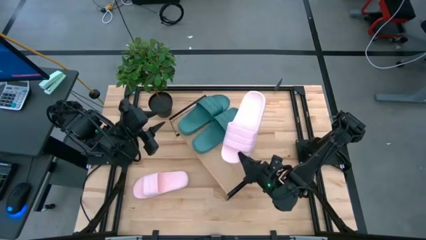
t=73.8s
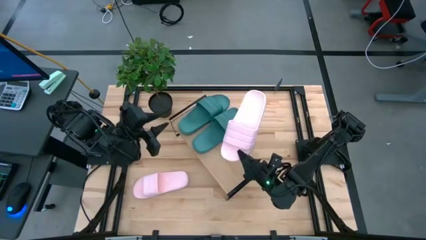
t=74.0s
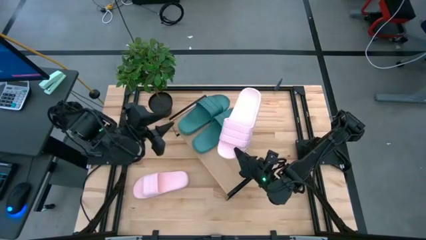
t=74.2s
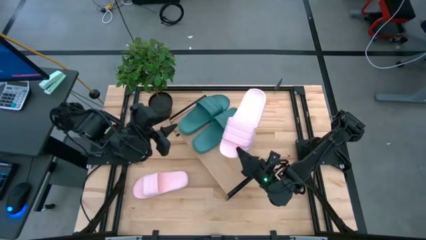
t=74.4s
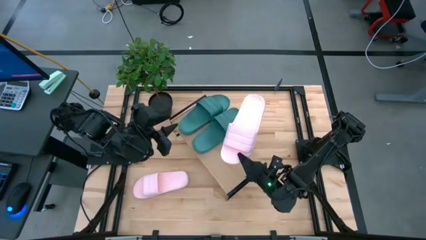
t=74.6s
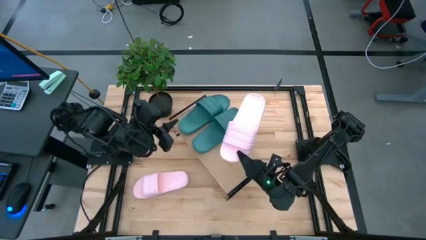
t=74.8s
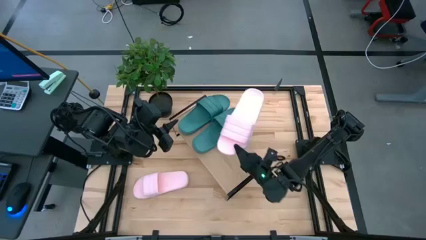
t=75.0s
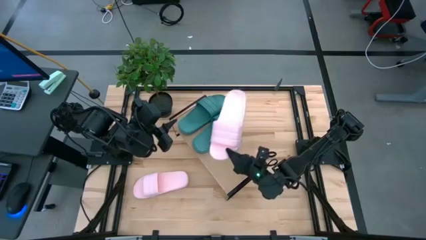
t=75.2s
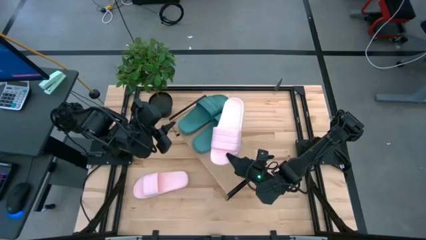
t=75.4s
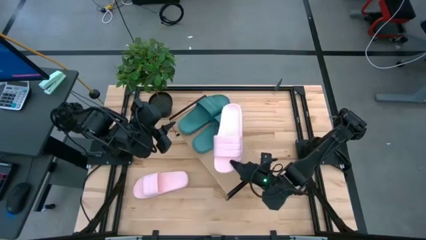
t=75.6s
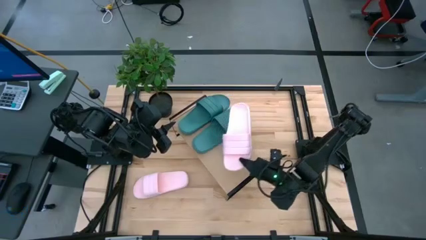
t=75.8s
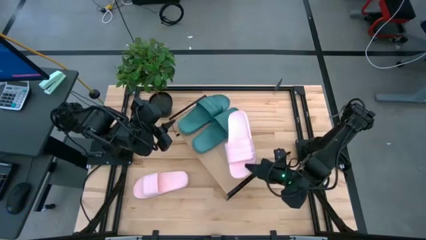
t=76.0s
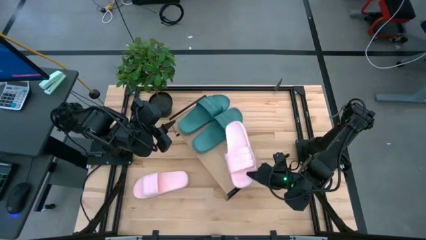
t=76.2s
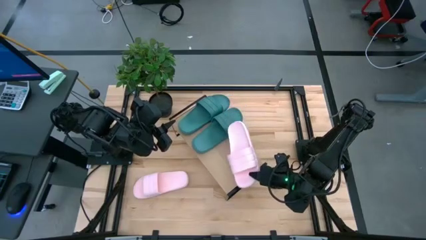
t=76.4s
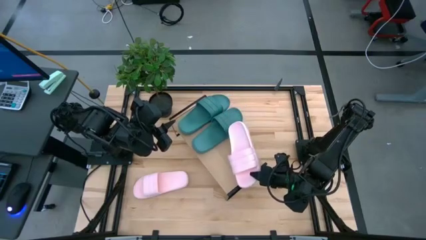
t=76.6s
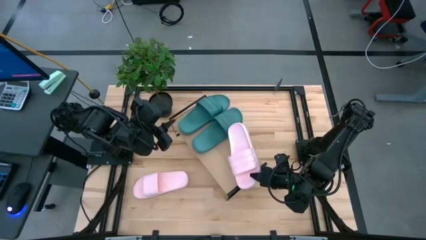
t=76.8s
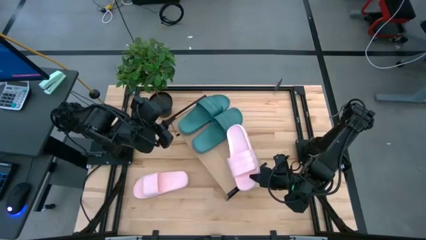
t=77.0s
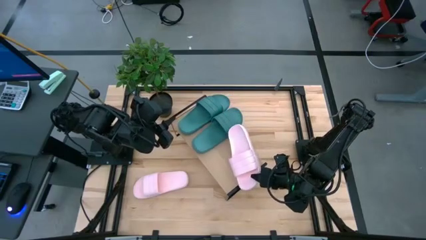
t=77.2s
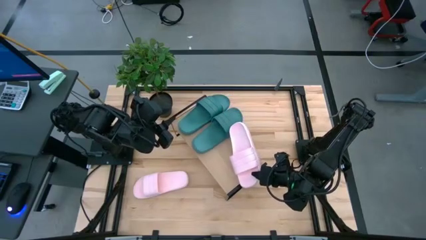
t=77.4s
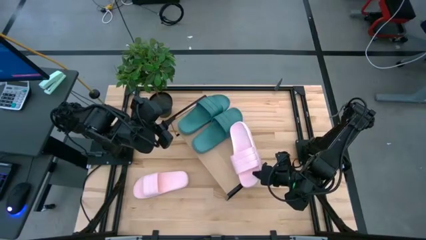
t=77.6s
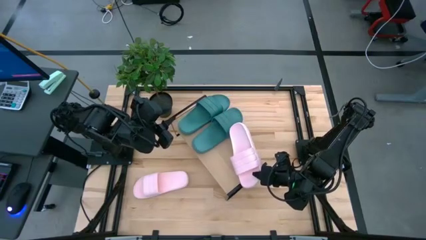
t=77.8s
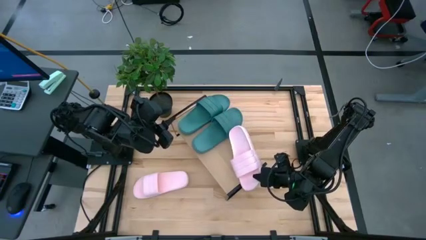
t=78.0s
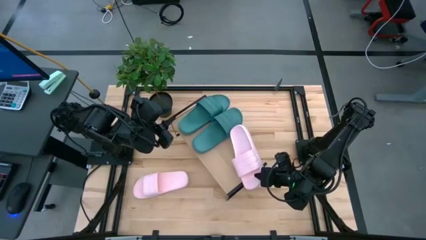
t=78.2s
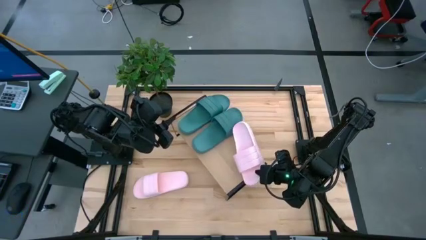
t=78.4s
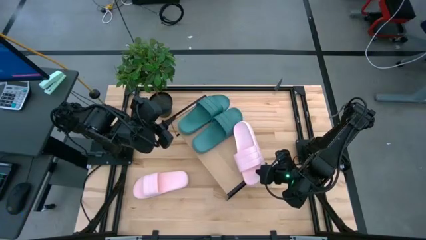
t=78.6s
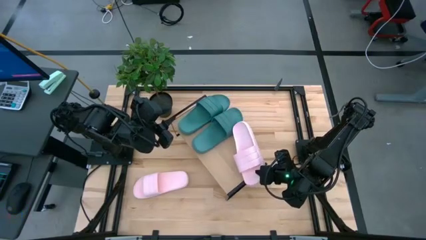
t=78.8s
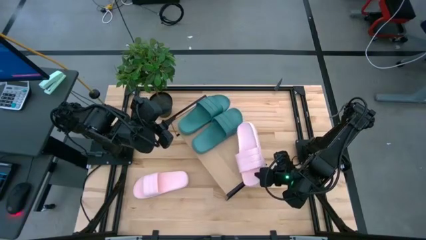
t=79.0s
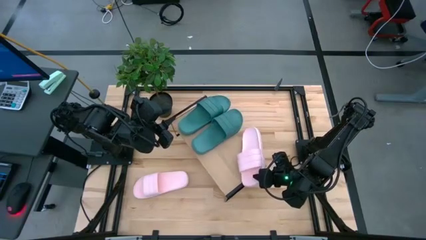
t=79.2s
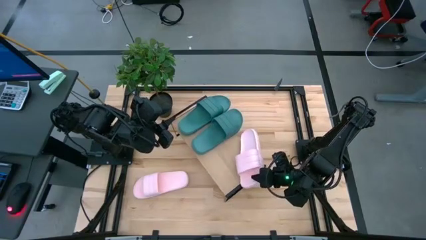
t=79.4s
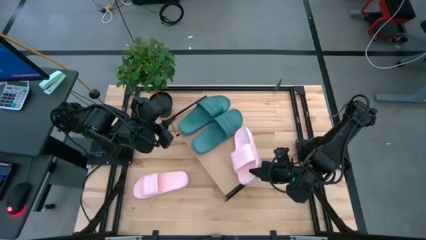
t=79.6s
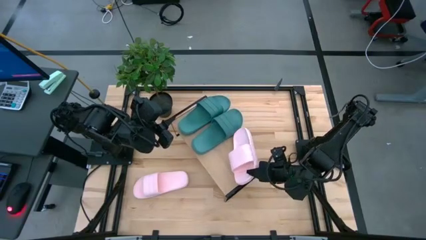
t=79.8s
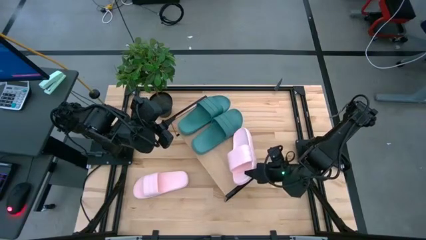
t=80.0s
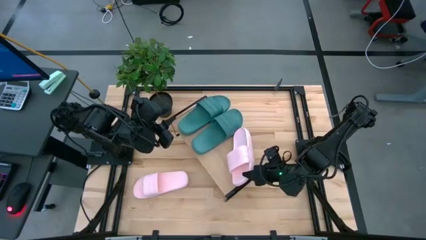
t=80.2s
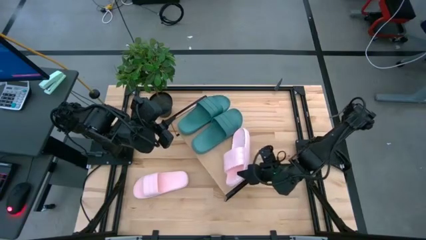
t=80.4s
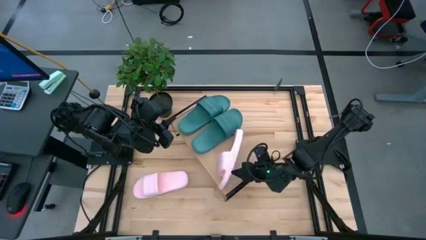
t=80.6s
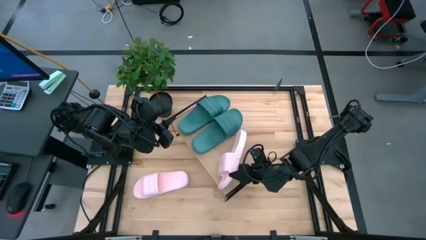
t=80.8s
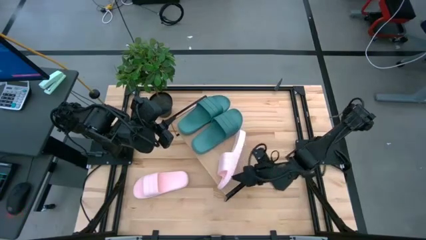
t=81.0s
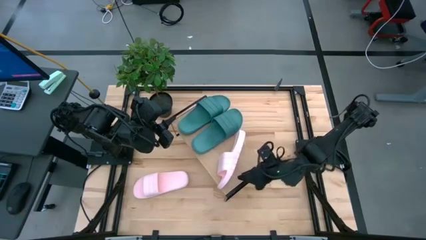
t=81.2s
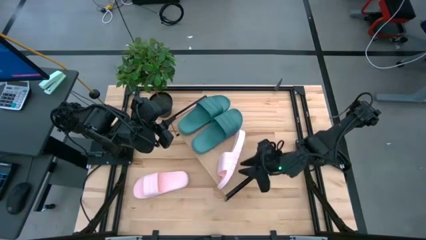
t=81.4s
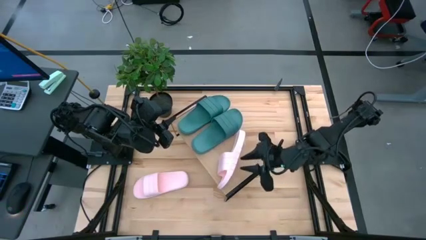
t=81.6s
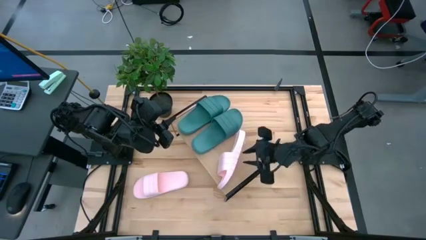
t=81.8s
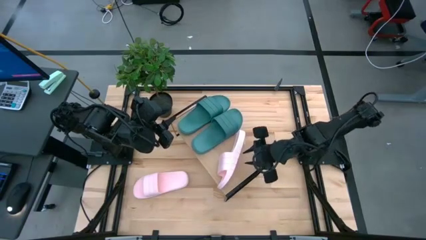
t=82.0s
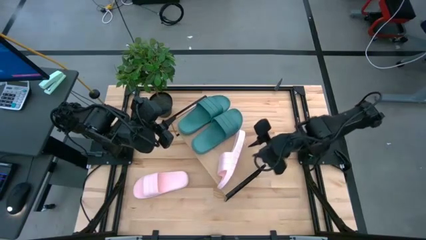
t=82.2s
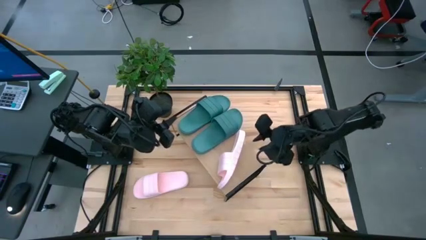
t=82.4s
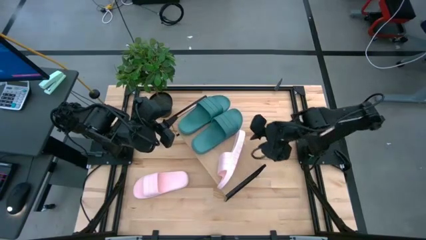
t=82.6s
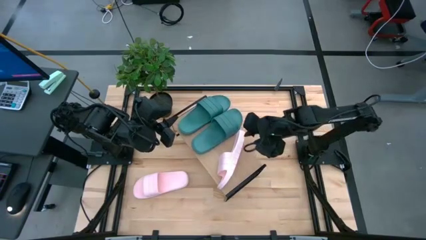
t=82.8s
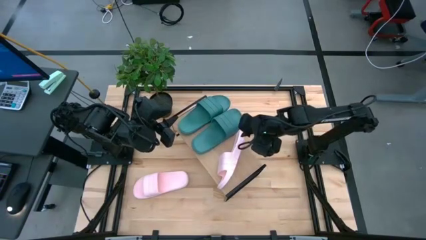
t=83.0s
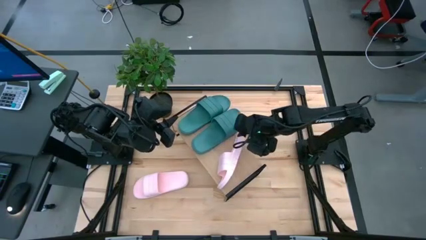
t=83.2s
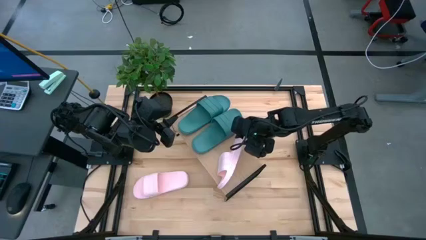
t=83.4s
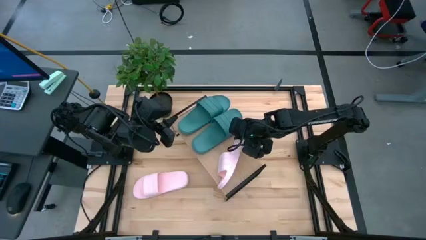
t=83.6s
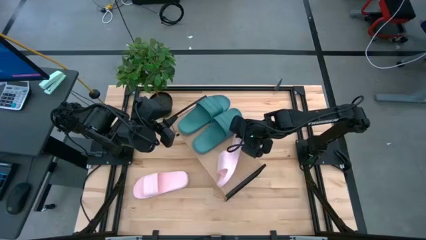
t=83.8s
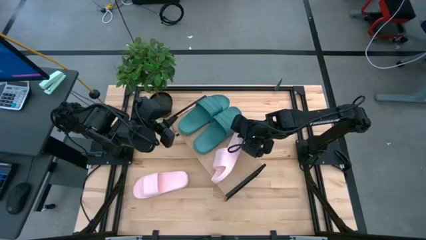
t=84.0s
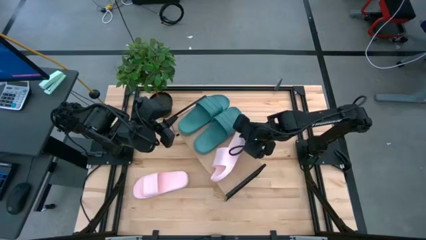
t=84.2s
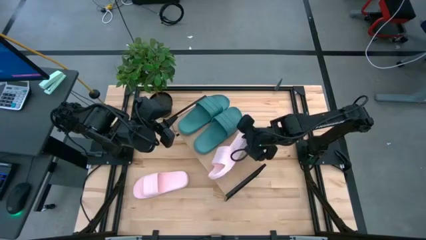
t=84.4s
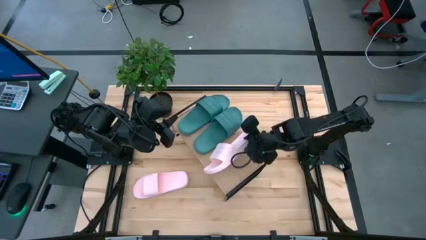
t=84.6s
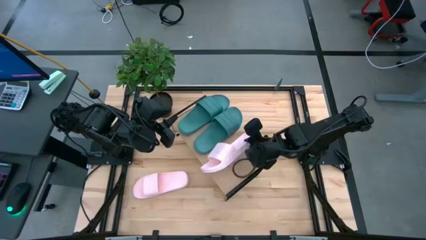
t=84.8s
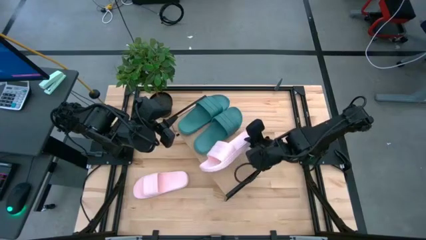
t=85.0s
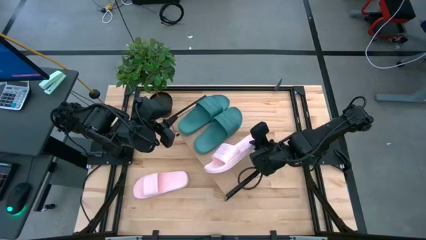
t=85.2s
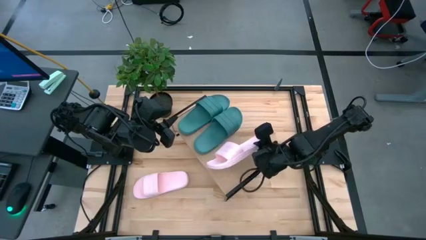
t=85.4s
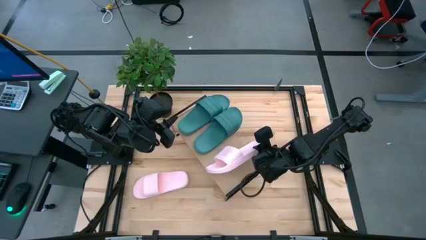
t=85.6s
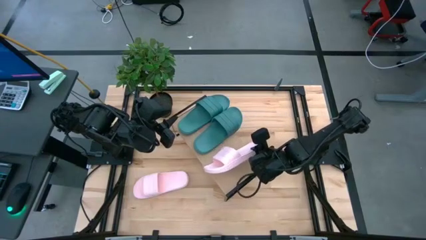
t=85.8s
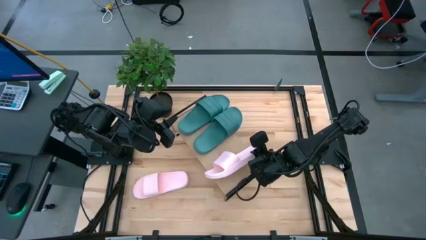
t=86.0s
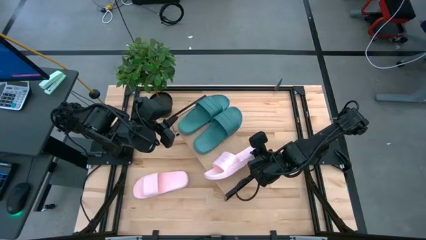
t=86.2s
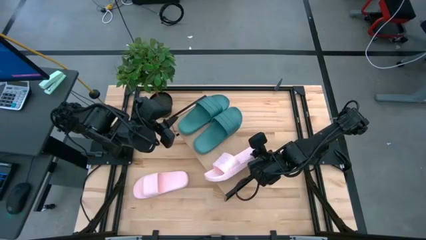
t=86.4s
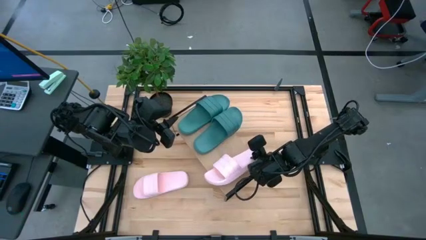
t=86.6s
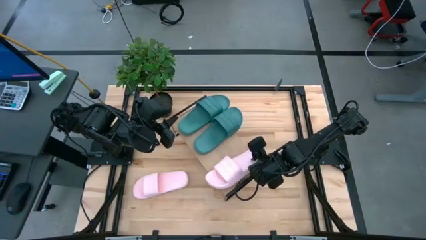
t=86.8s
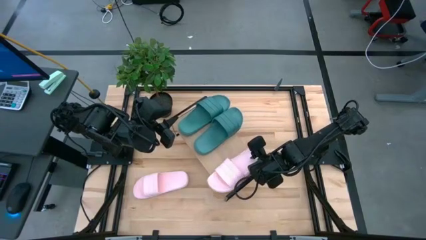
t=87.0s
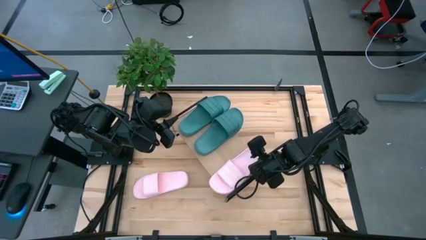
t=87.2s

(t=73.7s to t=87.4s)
Task: Pick and place slides into the shelf
Put the right pink slide slipper on the shelf

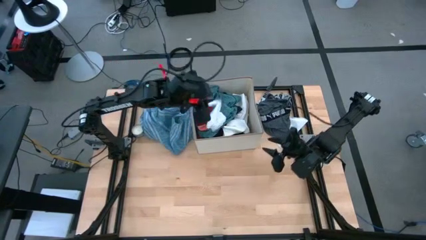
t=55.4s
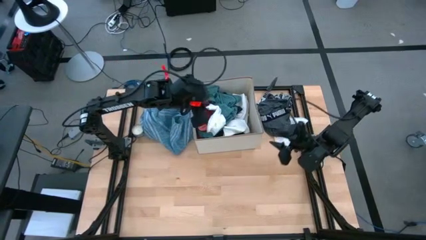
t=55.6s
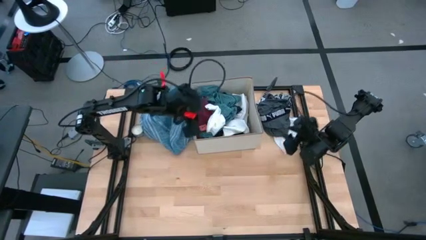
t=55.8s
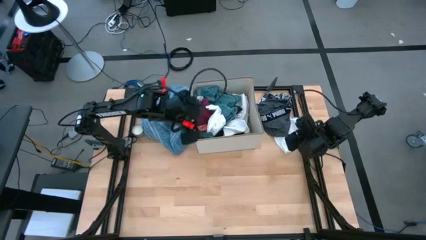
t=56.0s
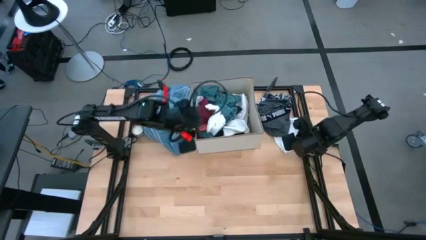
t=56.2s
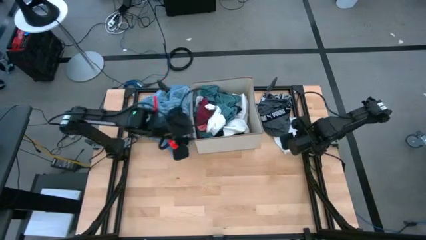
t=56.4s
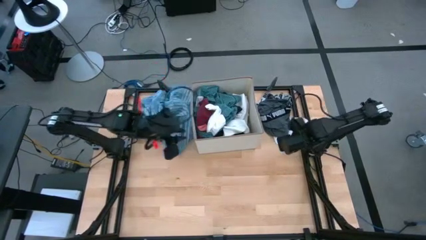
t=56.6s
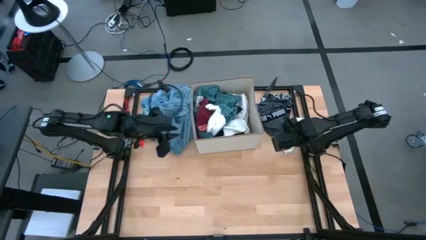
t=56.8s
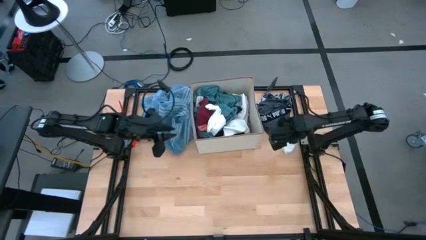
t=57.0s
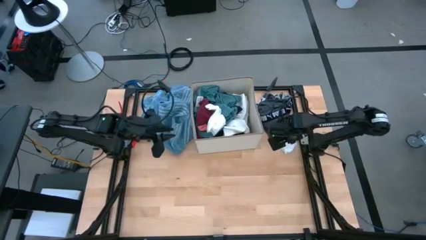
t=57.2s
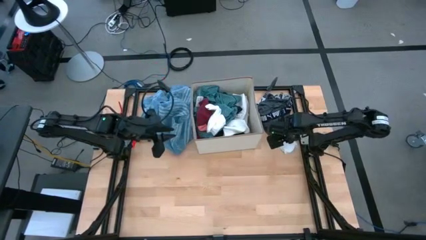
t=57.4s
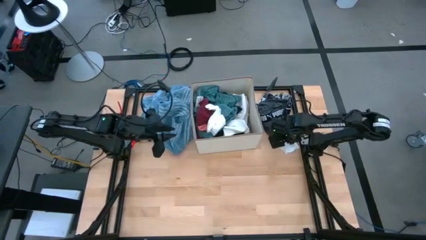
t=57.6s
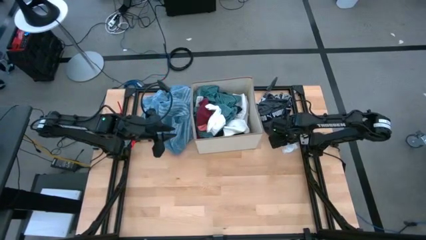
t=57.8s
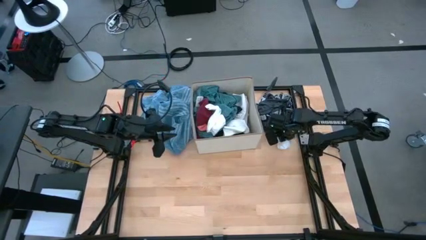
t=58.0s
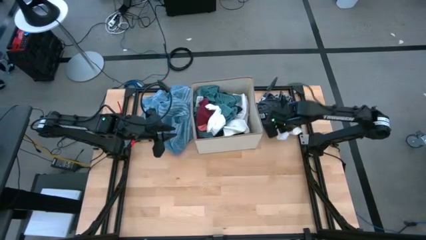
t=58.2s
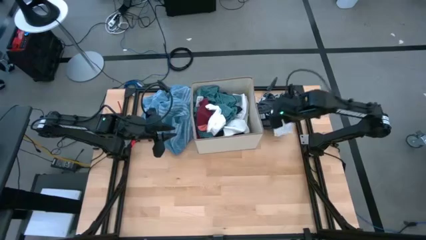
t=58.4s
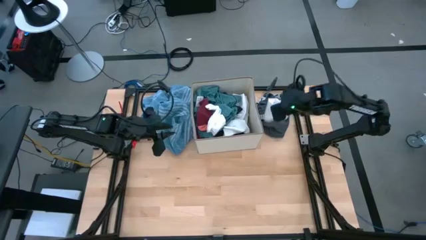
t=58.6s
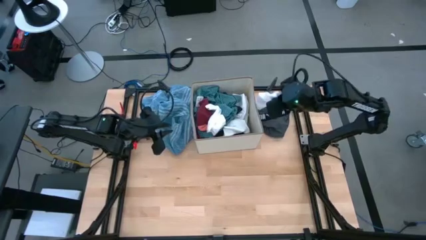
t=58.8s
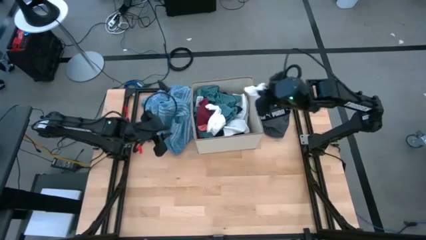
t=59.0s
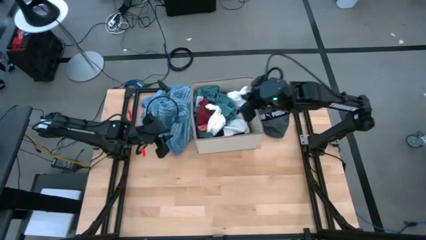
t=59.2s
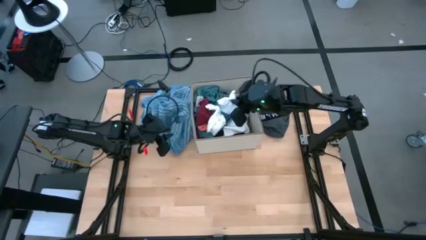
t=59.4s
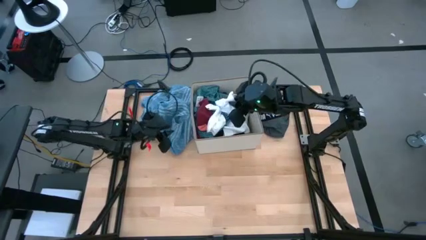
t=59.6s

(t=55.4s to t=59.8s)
Task: Sort clothes
Put the white sock into the bin
